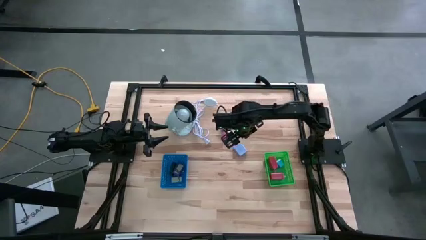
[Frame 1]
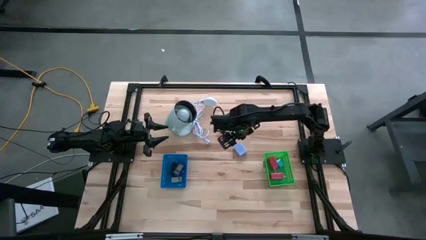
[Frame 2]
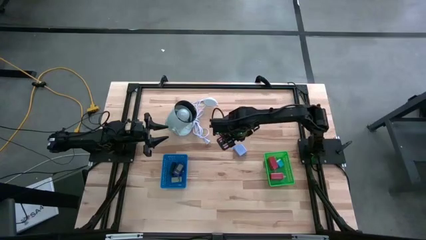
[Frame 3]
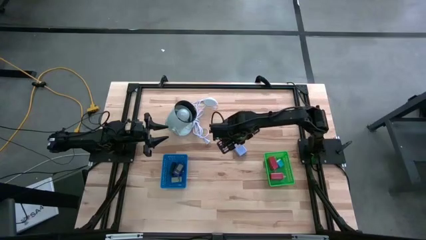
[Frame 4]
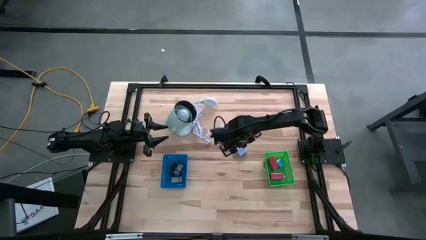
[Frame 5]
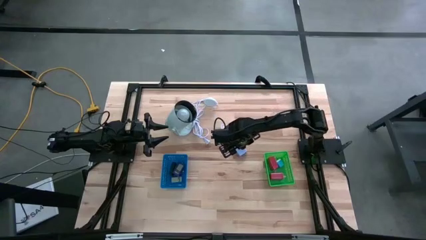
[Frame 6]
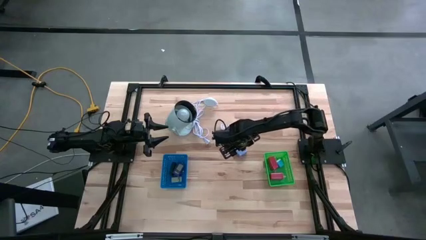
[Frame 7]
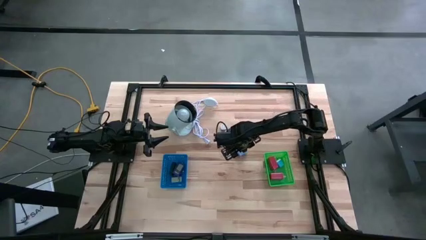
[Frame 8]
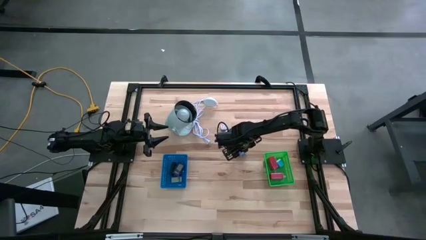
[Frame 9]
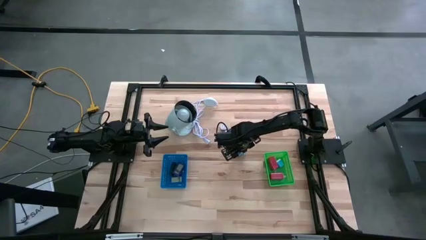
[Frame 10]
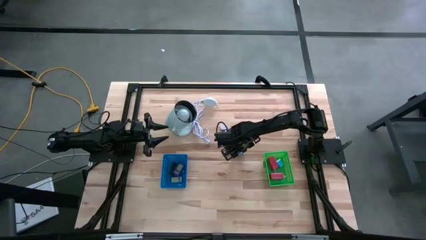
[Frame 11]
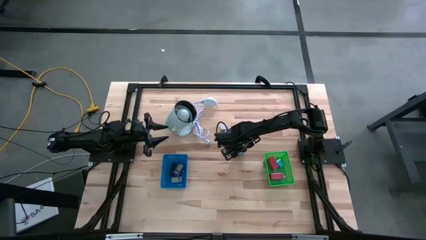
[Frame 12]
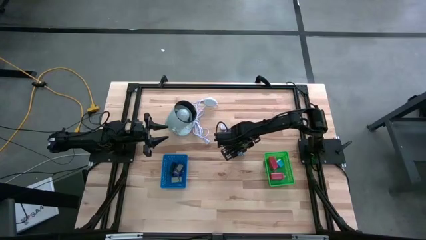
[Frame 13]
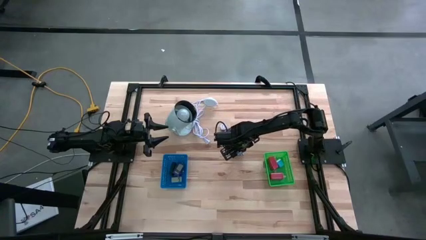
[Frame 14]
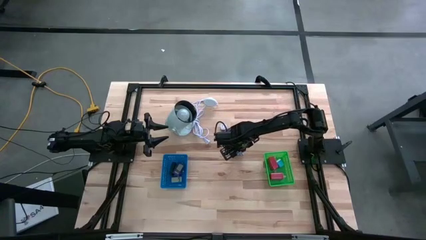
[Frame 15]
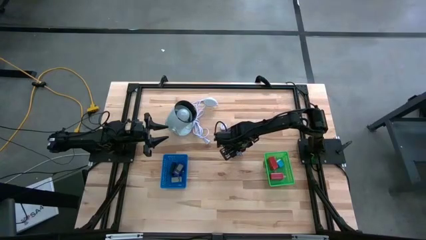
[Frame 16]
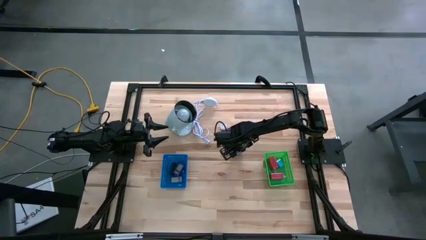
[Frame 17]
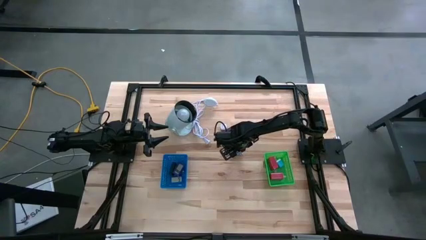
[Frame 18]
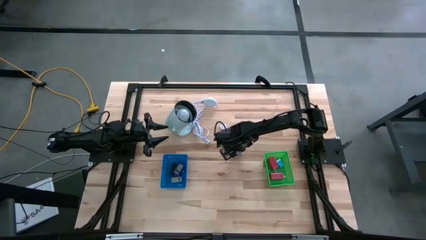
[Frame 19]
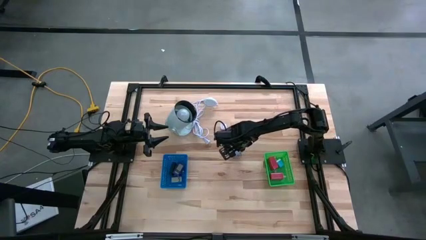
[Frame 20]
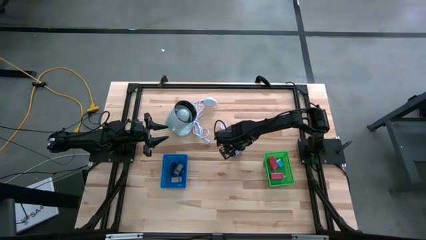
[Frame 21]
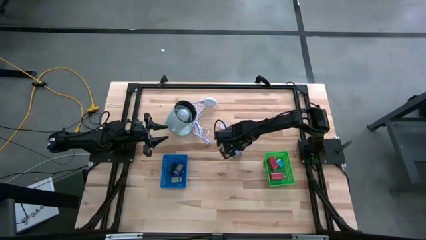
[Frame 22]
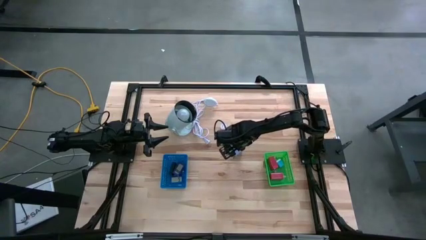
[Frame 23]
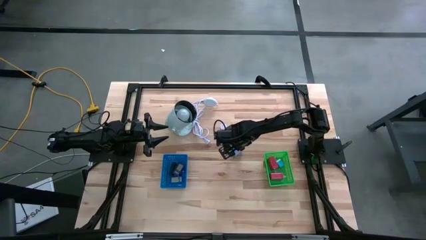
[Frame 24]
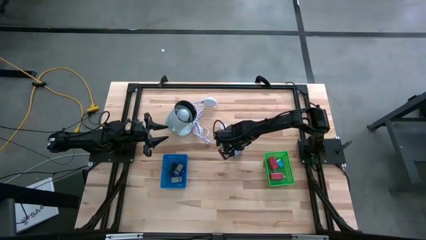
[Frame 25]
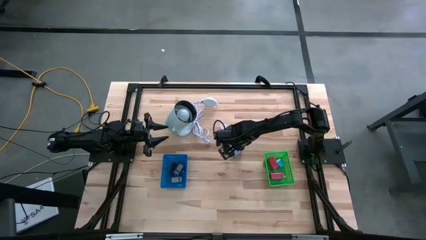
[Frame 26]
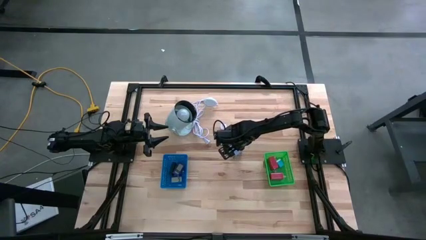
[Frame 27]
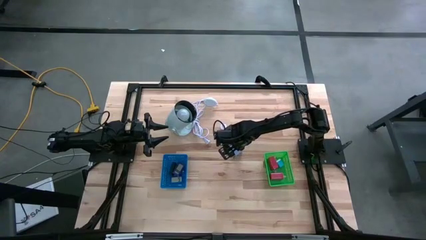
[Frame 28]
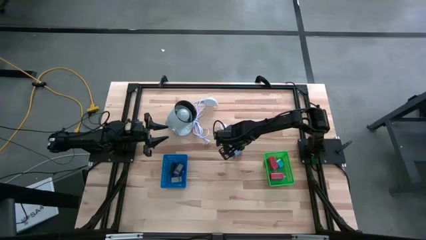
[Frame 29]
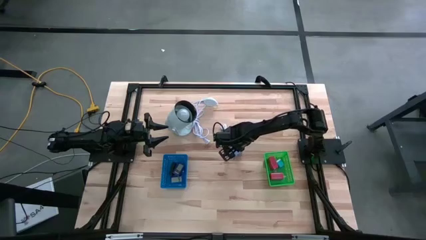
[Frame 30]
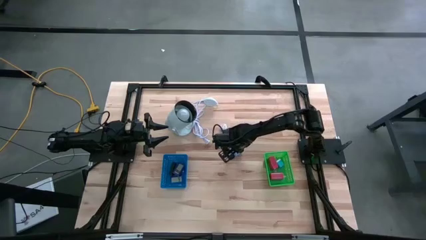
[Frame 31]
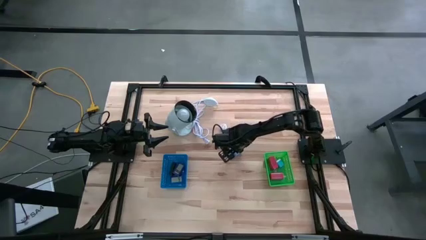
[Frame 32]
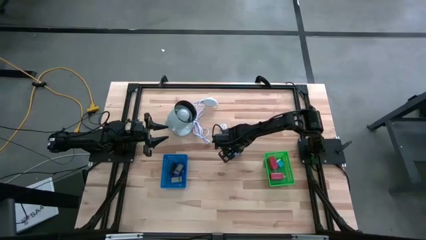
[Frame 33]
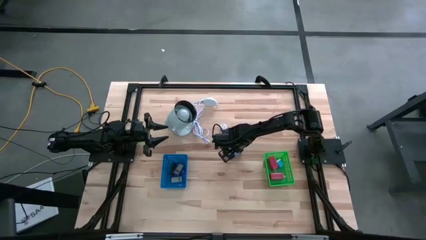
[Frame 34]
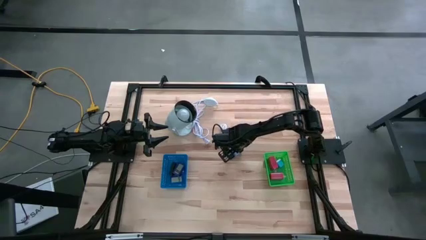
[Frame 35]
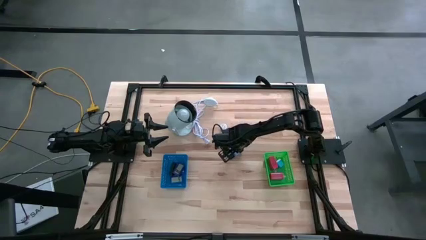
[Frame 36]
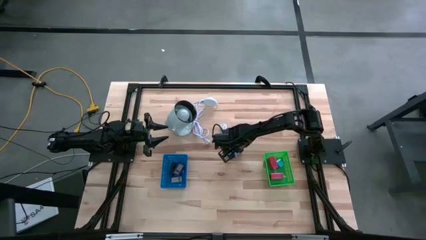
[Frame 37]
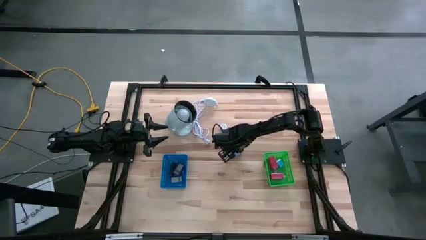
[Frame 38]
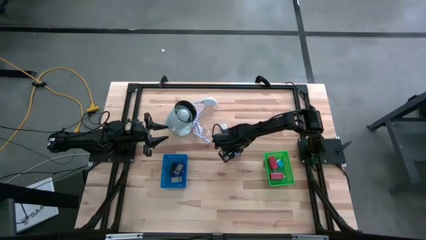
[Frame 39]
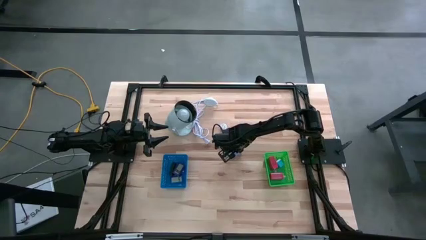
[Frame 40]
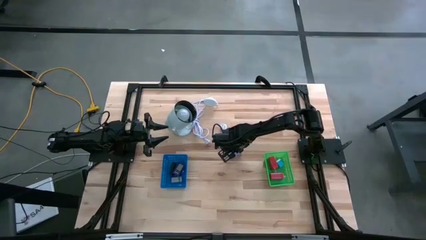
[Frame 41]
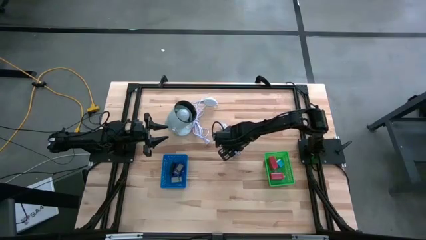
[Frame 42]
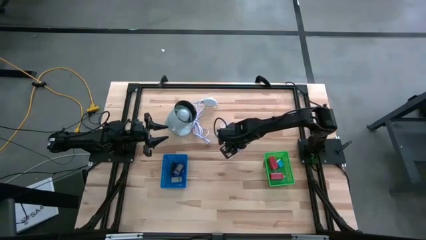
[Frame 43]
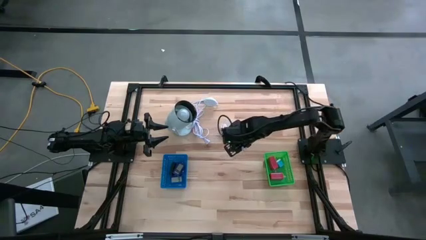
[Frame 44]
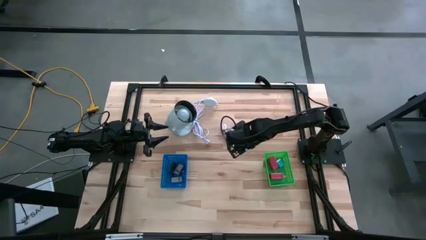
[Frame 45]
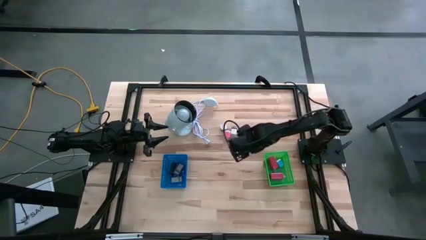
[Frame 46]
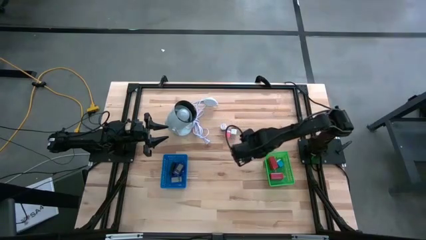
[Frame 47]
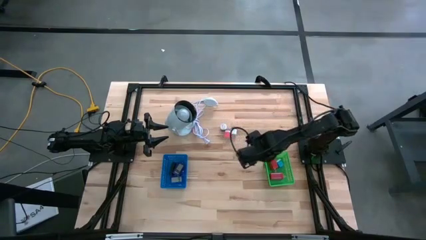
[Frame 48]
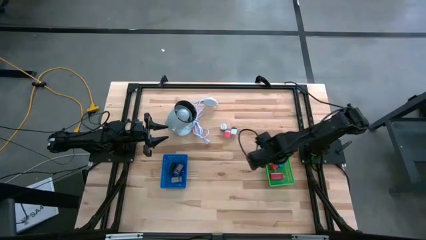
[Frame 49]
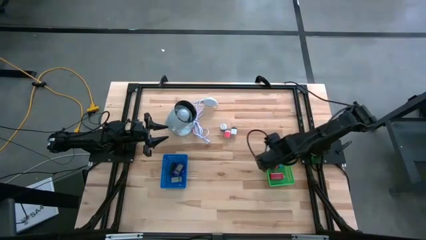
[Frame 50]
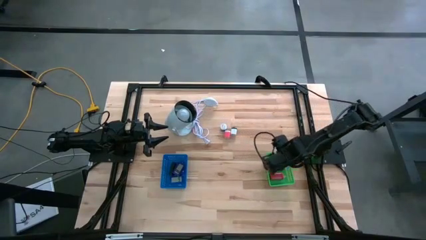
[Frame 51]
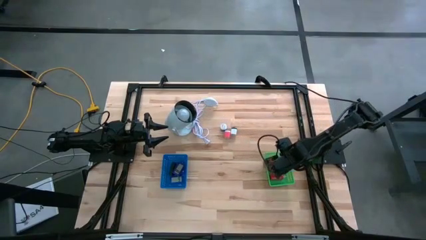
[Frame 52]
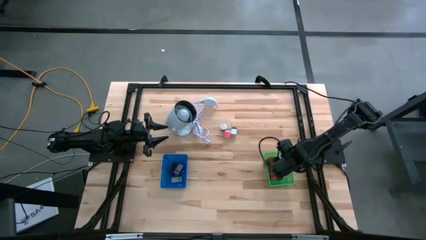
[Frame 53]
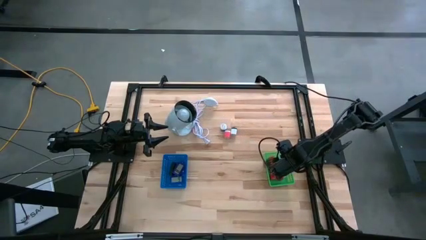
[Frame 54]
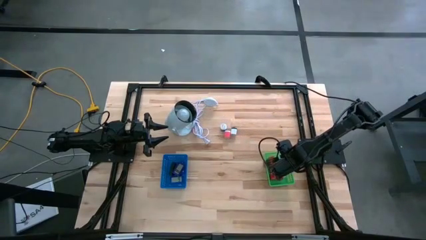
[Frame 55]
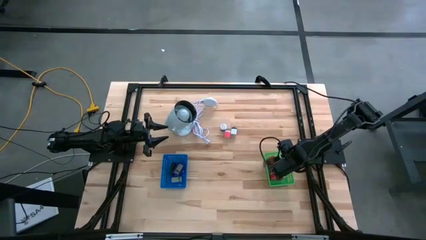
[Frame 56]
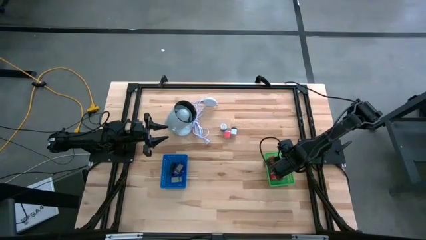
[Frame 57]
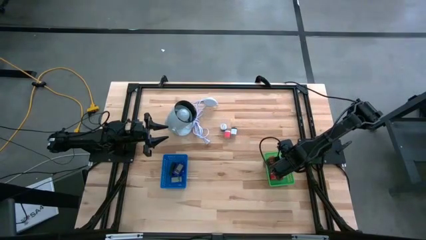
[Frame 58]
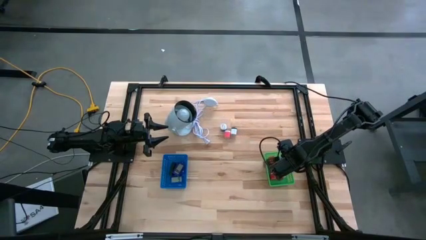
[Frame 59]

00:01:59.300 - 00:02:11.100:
Task: Pick & Place Office items
Put the light blue charger adapter into the green bin

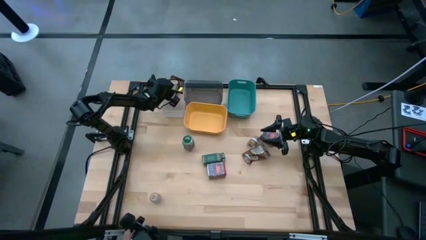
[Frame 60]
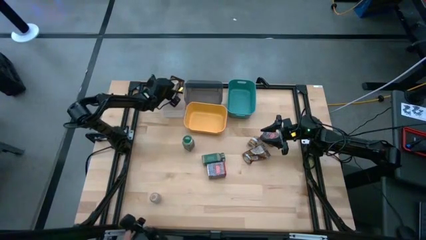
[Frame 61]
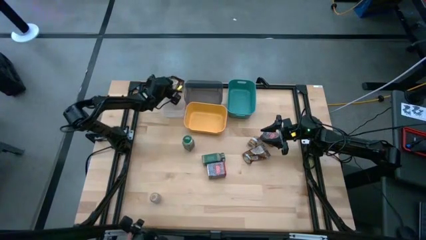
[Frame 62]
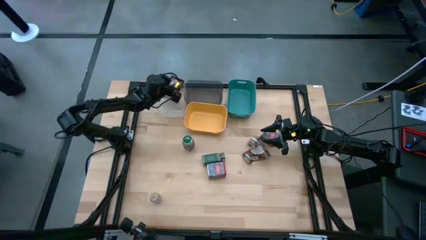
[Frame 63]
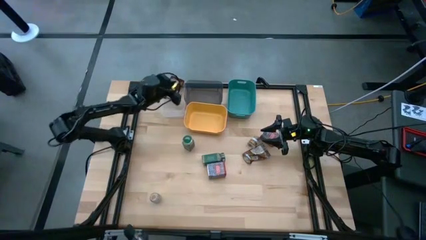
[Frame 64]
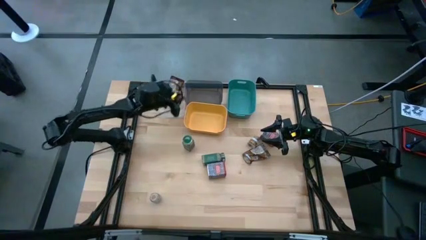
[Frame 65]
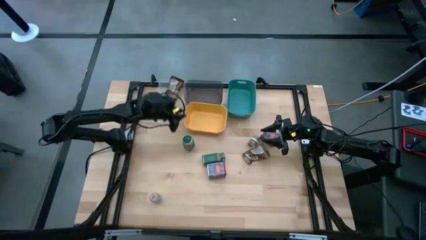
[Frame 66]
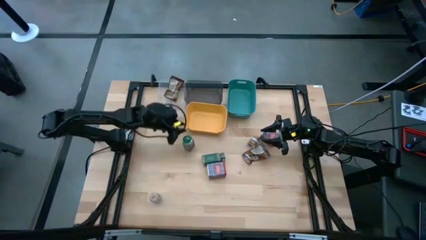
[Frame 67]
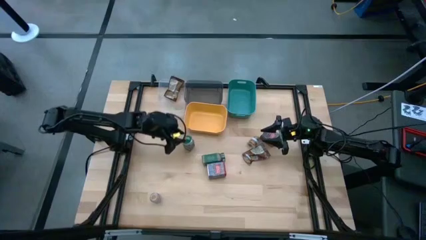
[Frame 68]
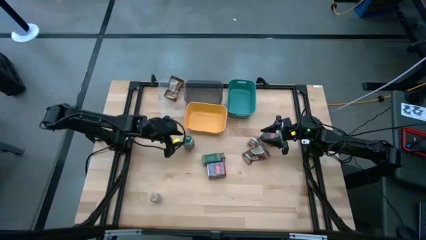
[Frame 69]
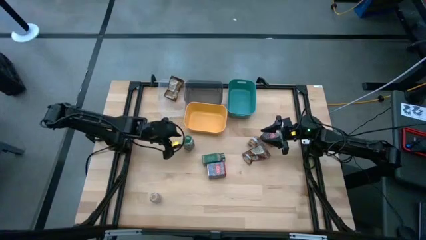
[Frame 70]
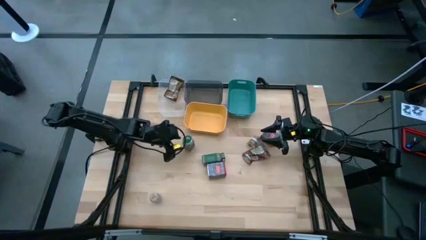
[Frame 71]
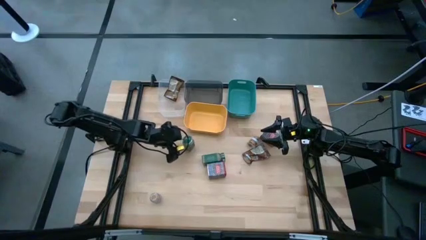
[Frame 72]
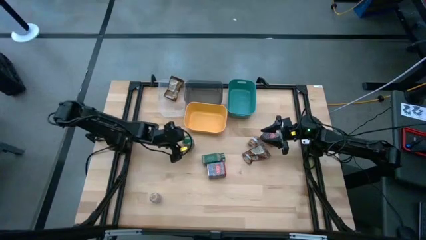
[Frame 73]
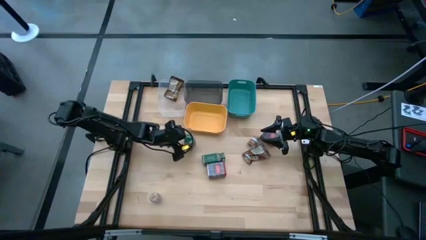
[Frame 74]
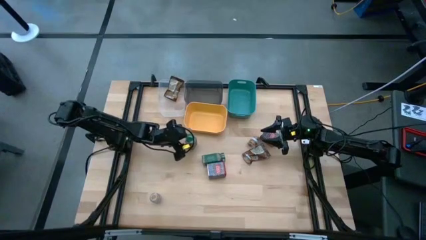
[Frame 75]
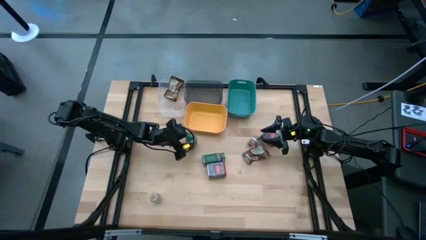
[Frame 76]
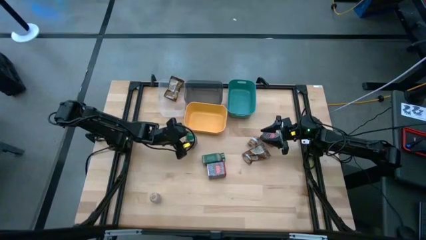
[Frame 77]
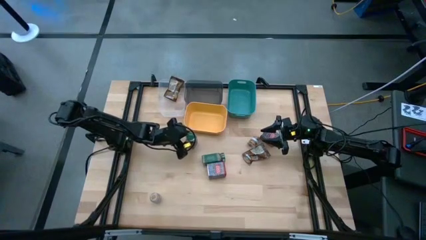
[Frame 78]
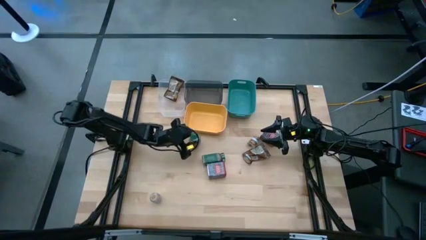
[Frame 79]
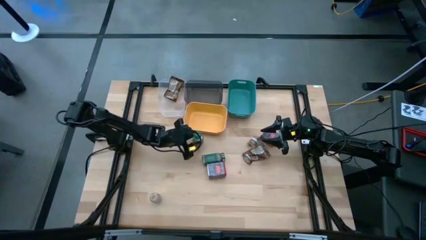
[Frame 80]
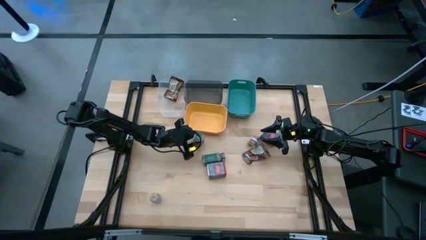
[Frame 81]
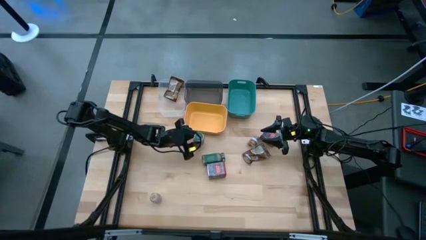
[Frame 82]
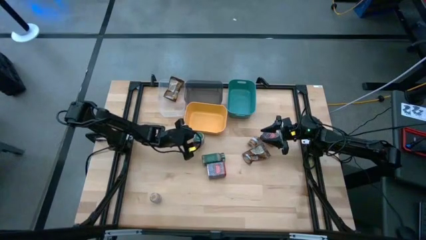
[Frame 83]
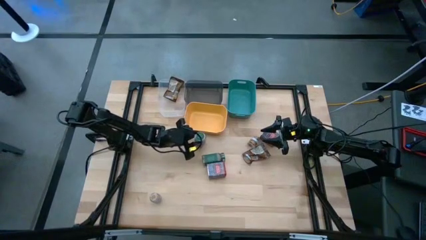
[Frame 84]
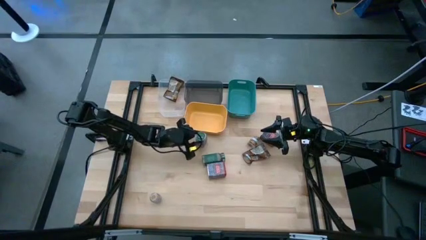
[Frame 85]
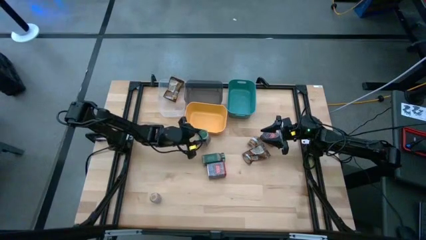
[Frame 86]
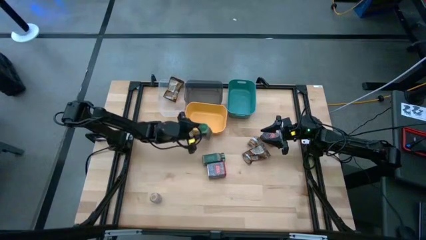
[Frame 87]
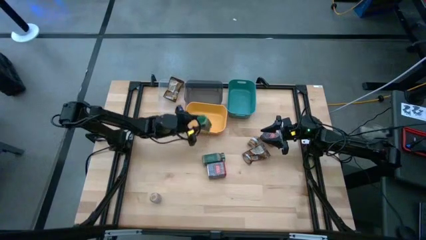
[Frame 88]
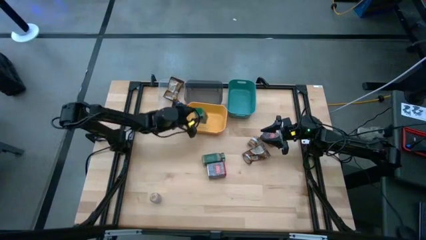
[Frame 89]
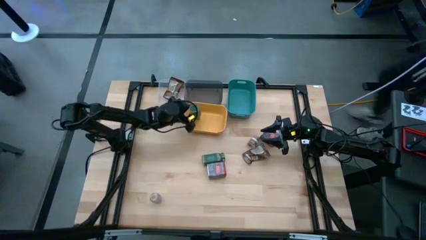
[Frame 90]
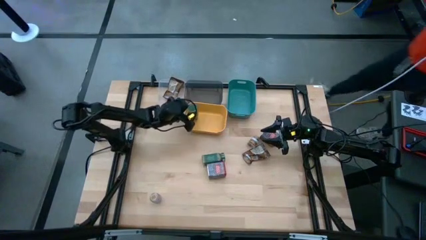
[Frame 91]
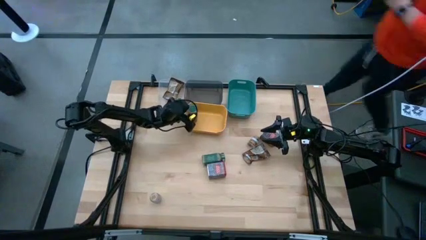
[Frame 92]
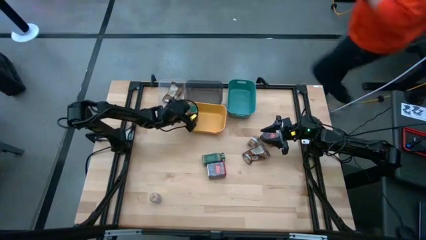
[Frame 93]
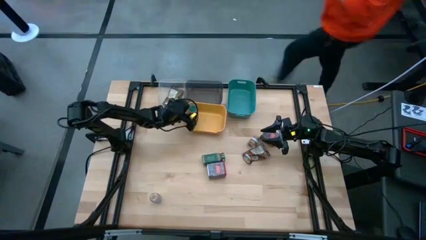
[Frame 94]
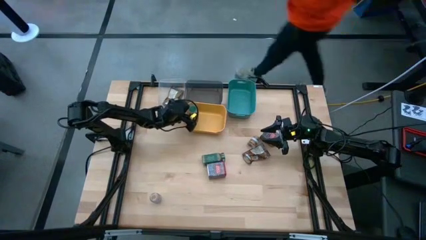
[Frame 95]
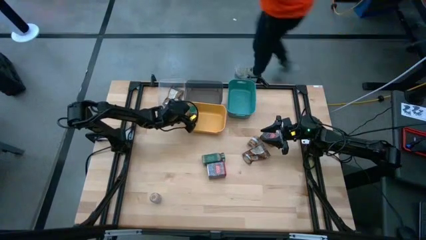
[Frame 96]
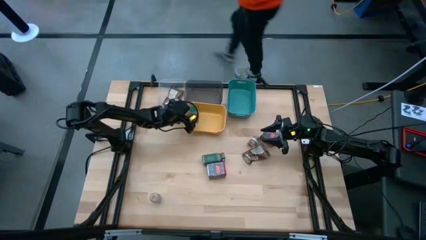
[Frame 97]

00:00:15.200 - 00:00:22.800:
Task: Sort spices by type
Put the top green seasoning bottle into the yellow bin
